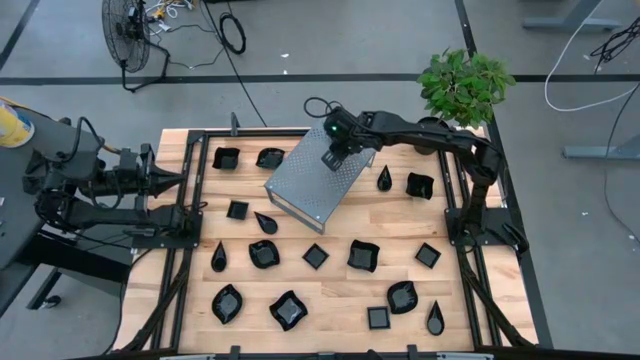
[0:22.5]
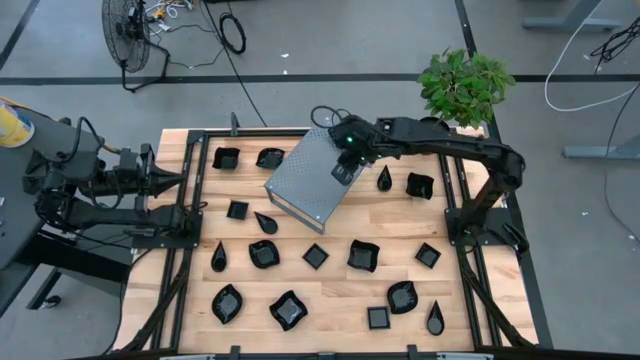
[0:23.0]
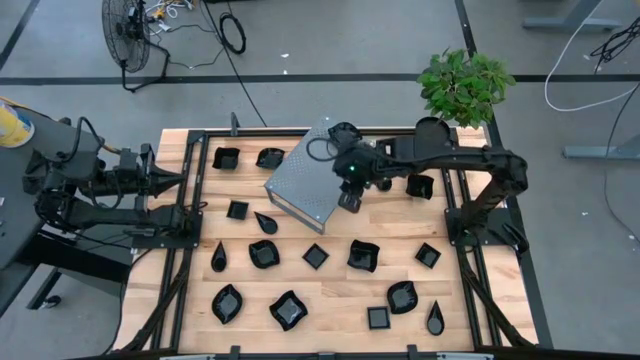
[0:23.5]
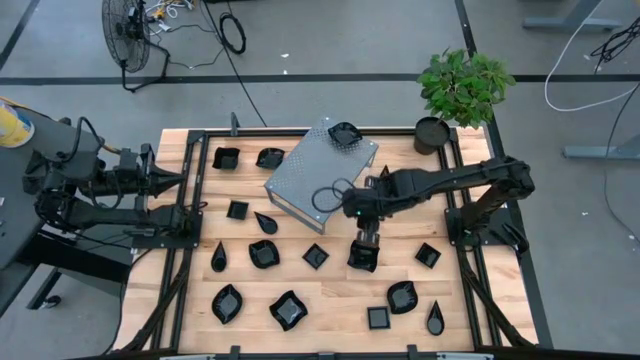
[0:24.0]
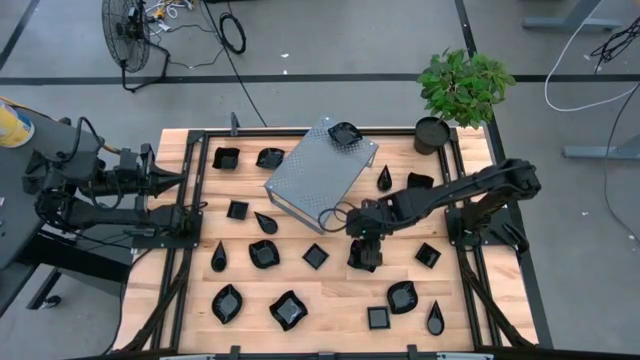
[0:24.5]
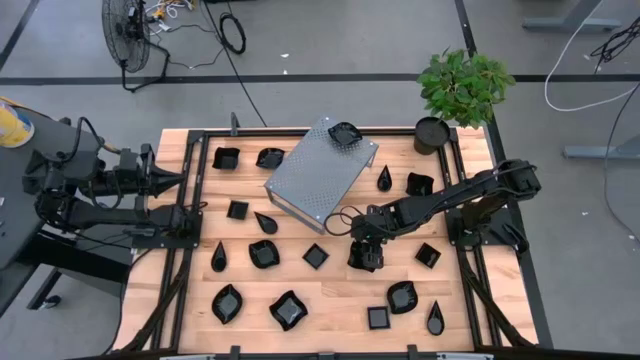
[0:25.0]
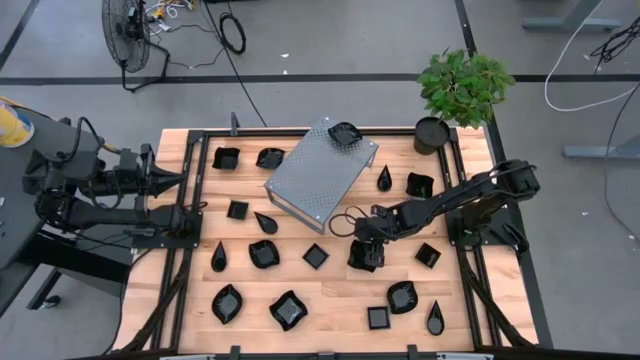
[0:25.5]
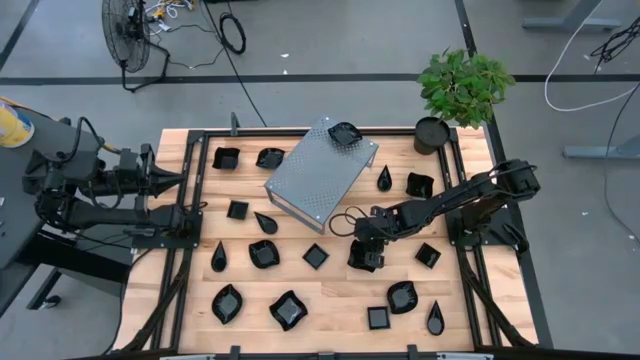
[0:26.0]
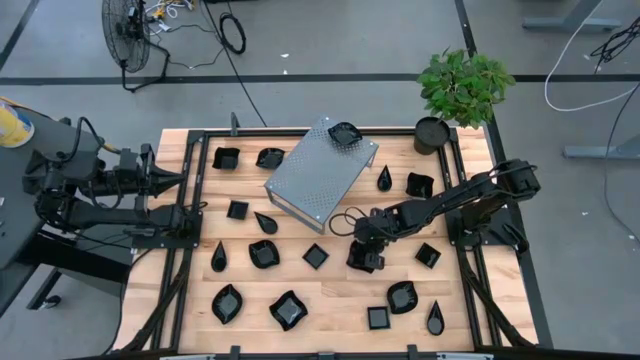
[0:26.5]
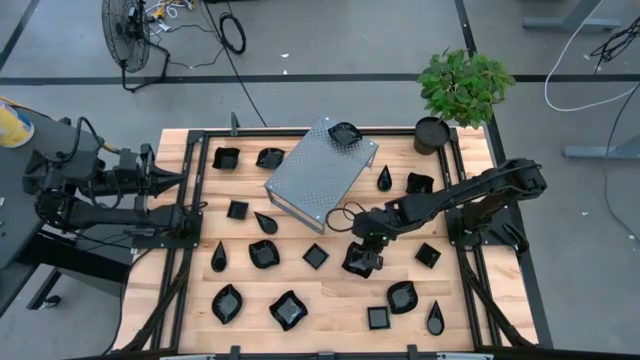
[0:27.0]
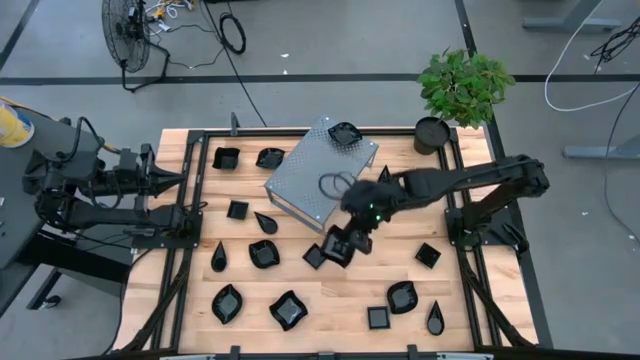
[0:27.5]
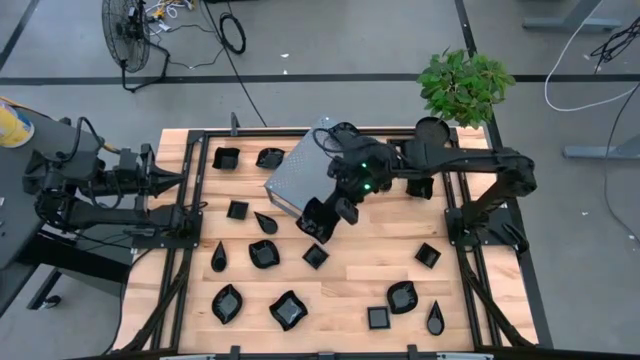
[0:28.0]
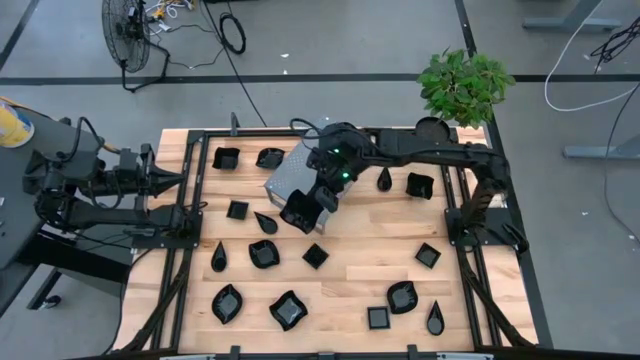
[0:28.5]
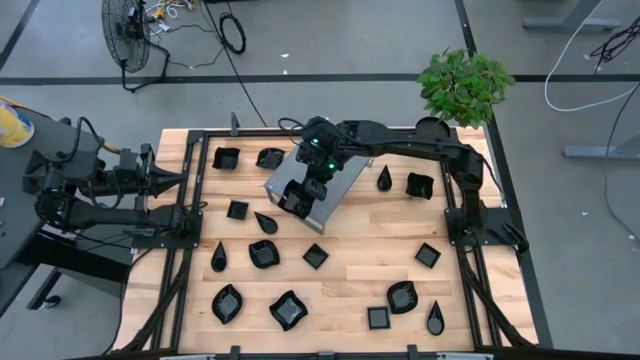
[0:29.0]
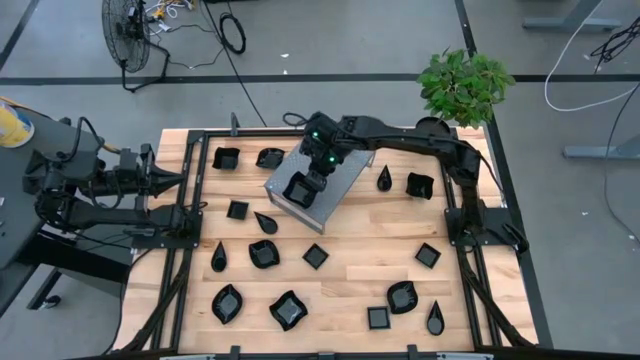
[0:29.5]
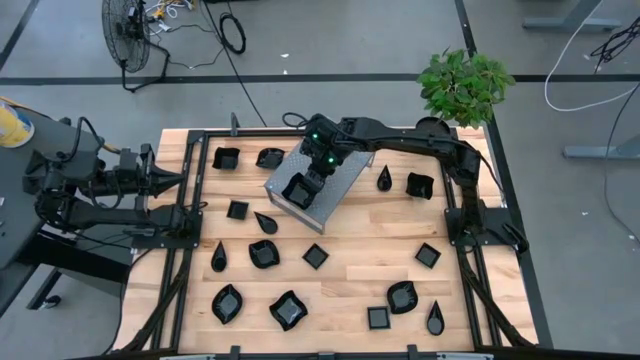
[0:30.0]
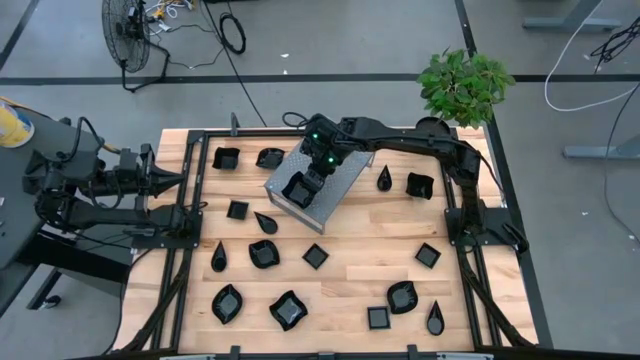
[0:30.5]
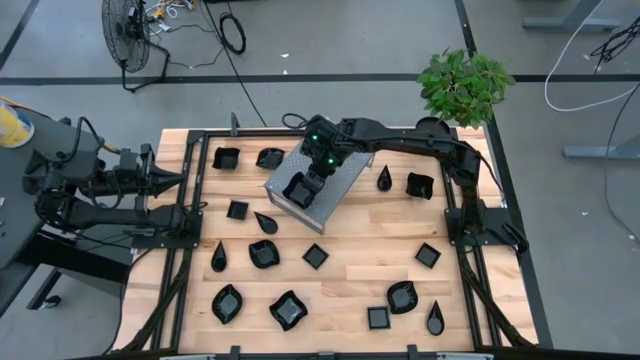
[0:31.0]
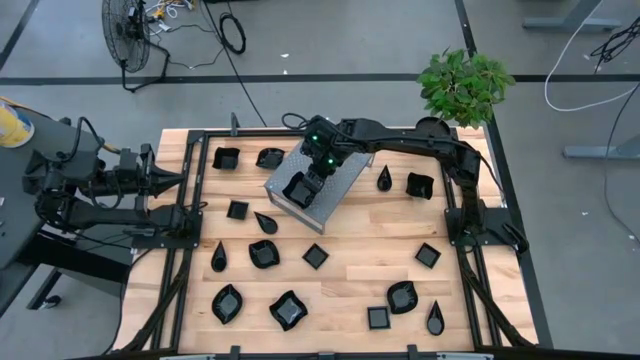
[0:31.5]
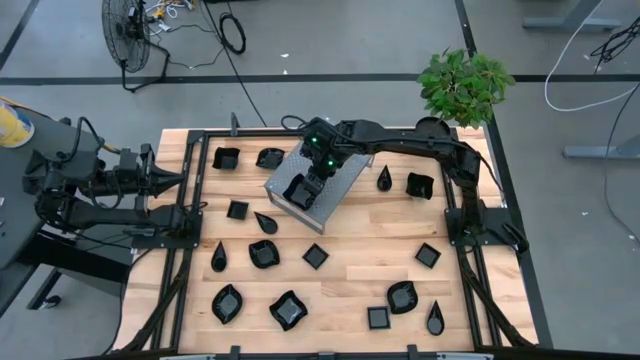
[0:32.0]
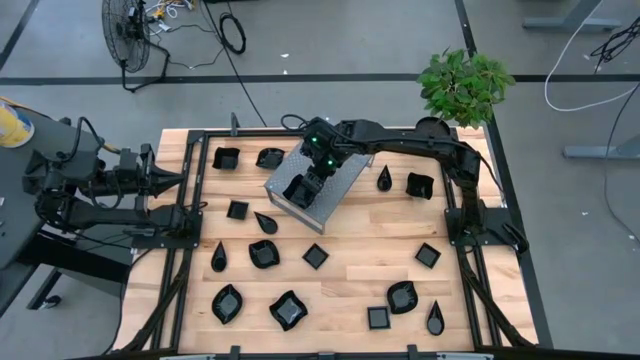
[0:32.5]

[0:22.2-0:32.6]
Task: Pick & Place Mini shaped plates
Put the black distorted square plate on the shelf

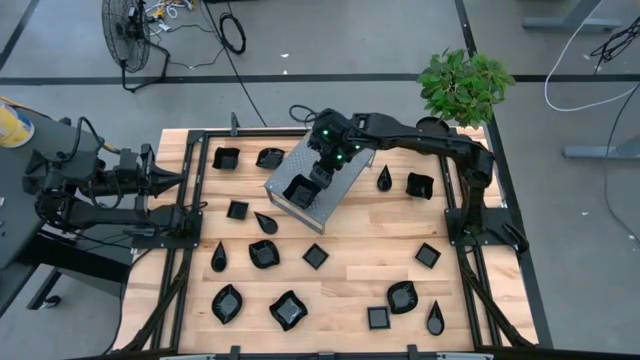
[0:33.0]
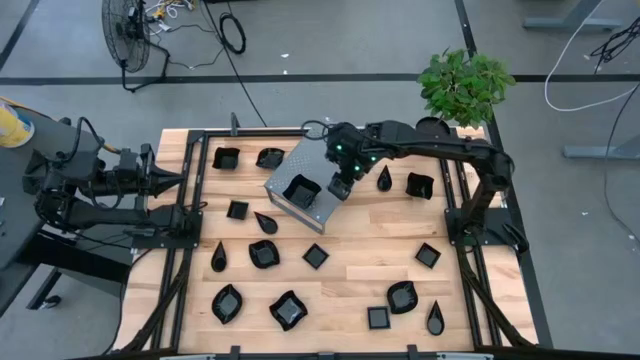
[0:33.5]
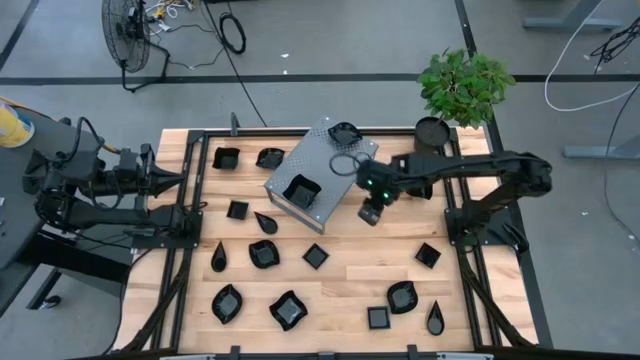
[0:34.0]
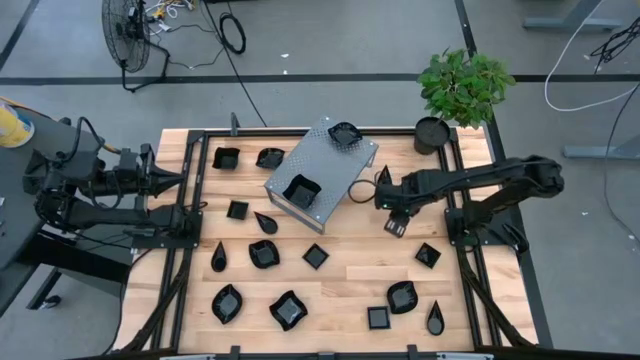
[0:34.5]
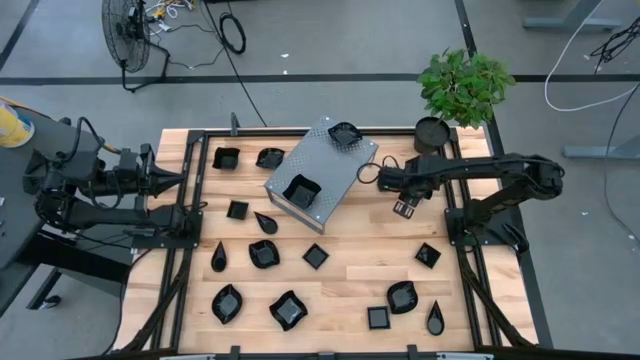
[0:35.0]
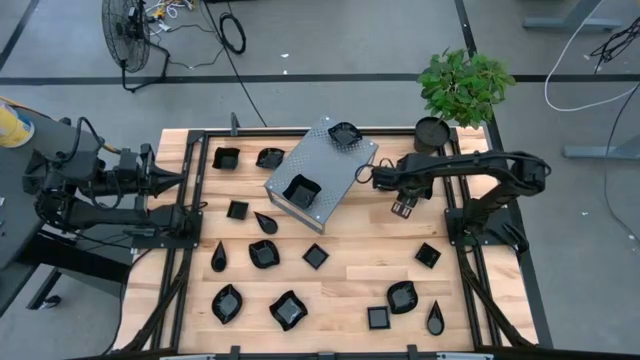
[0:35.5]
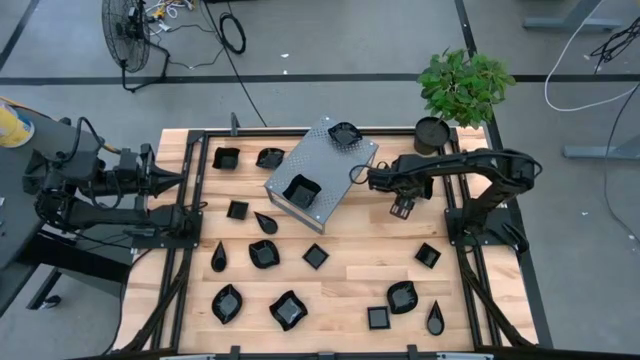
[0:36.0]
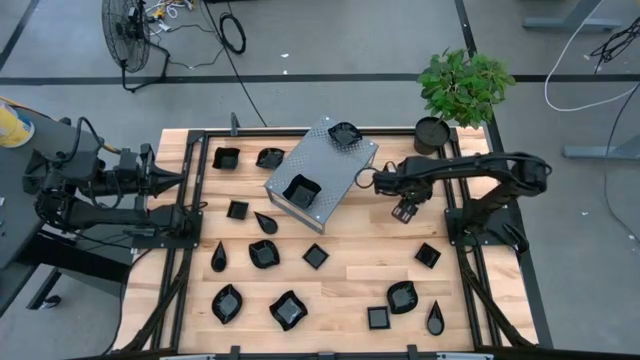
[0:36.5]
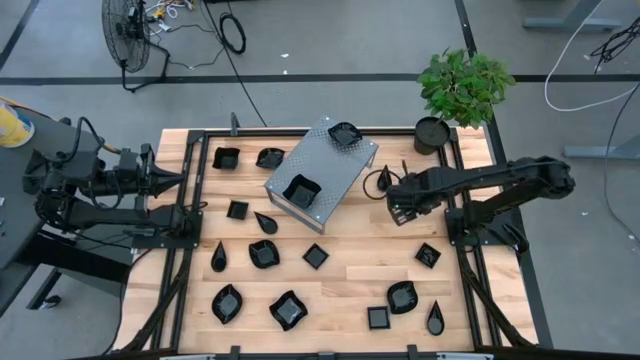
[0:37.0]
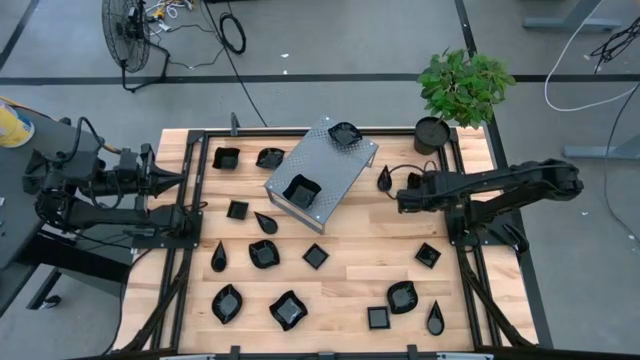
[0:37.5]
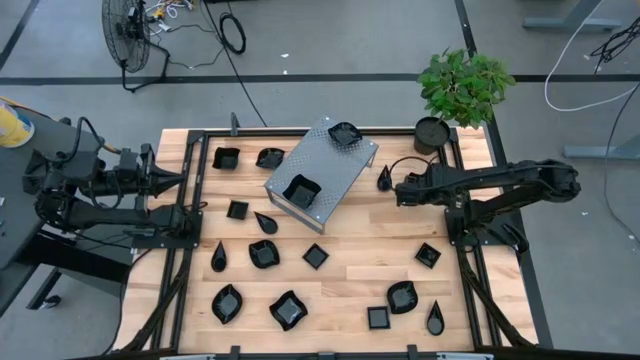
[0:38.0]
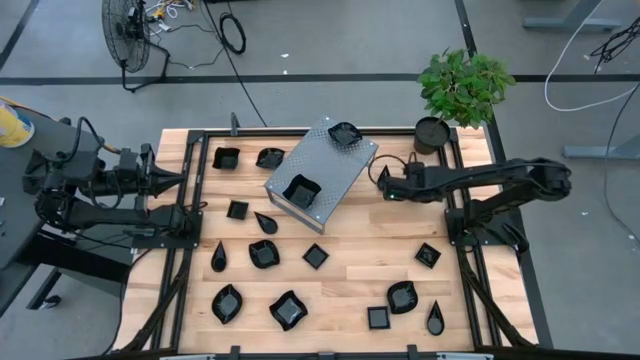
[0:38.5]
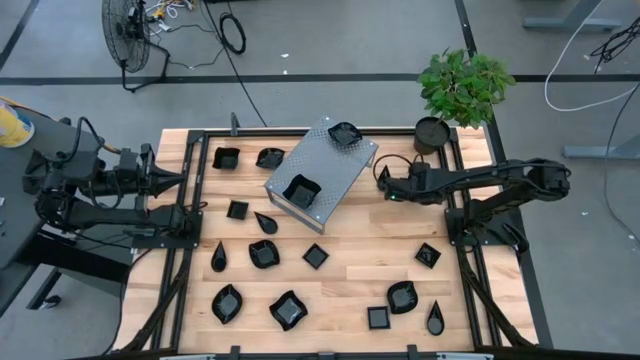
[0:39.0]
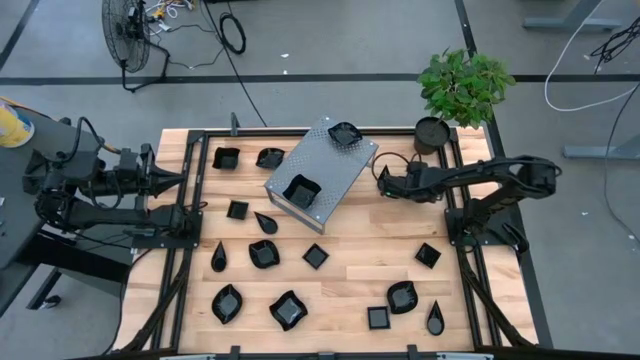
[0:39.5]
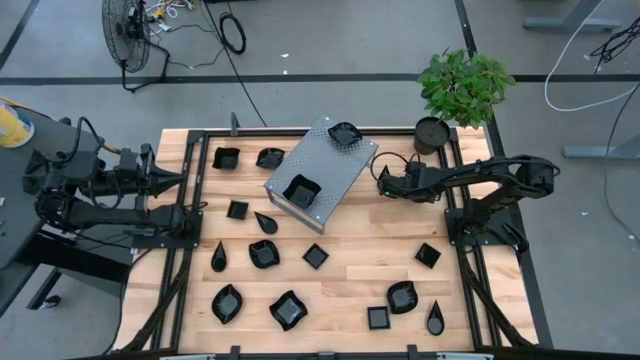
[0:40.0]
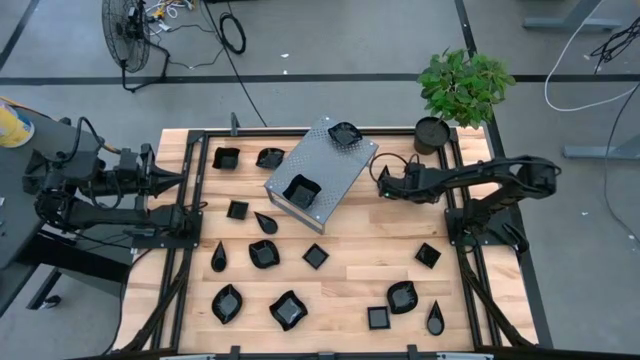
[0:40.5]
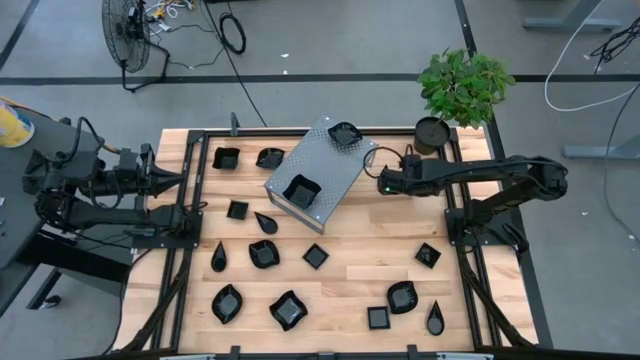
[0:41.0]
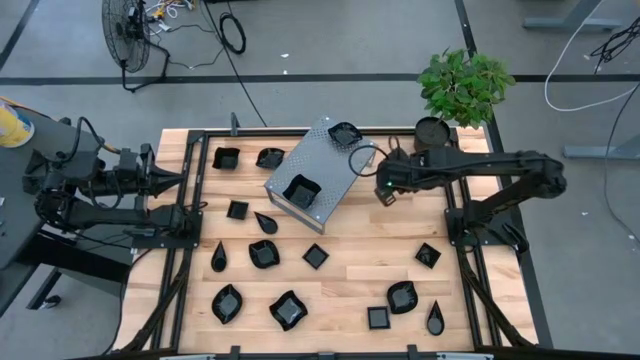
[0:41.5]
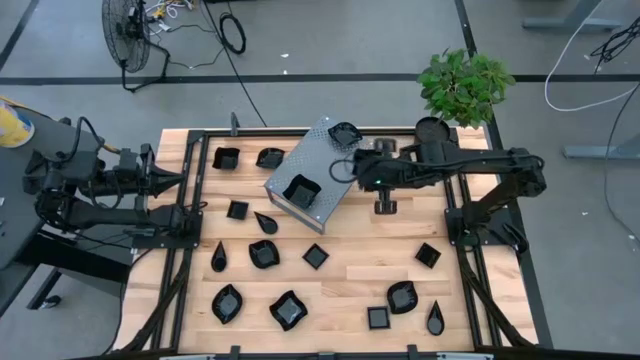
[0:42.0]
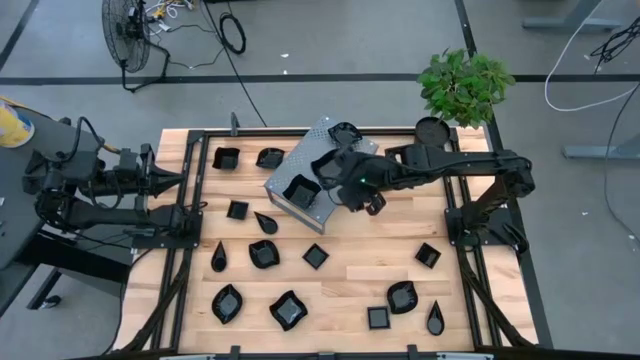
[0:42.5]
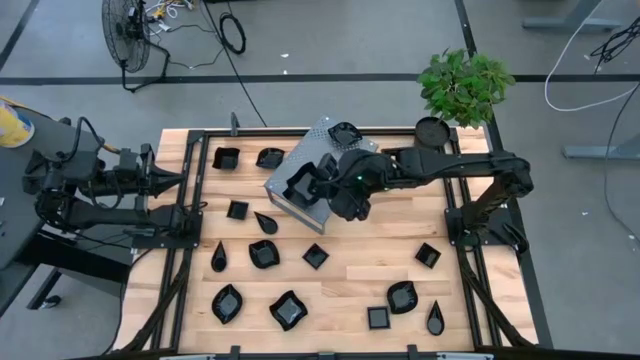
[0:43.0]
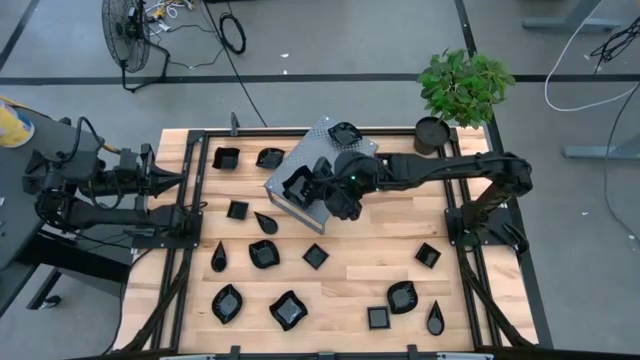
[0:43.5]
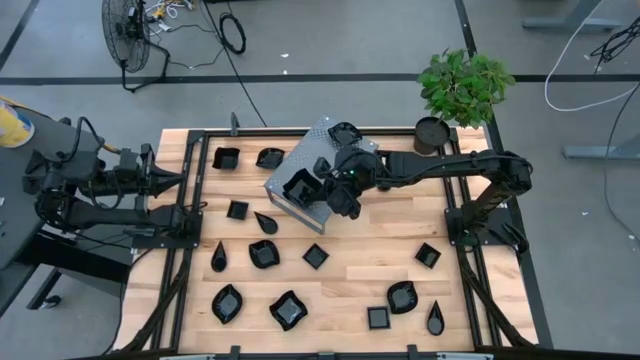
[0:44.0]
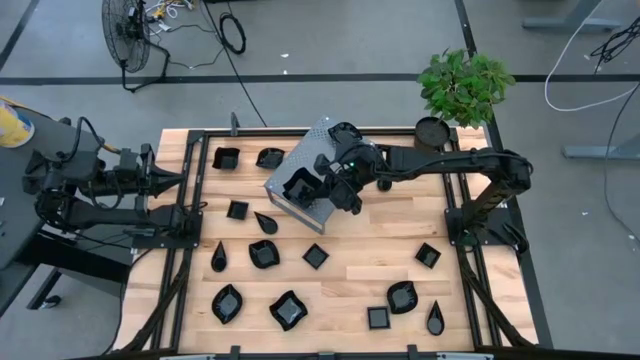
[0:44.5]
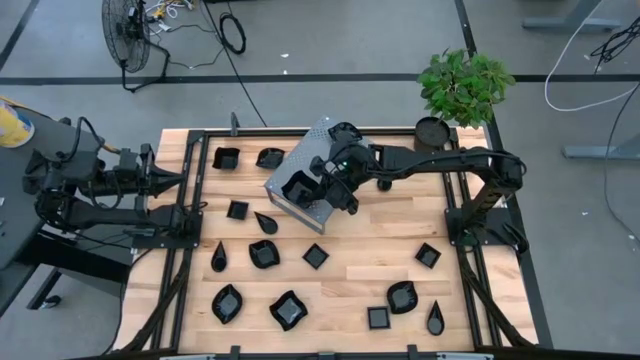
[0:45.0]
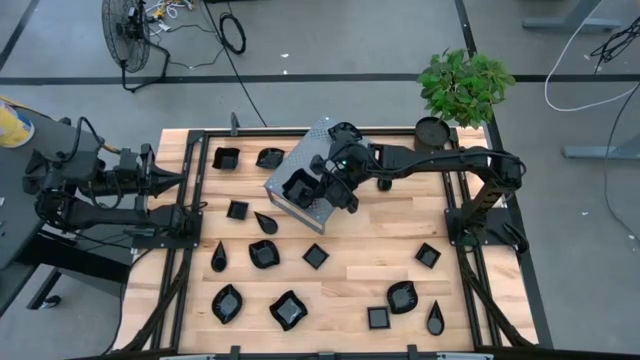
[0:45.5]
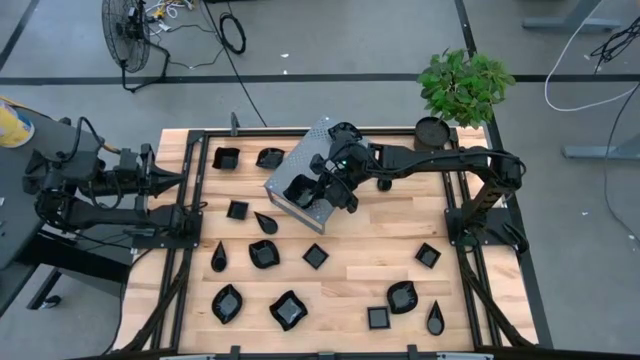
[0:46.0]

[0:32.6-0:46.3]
Stack the black distorted square plate on top of the black distorted square plate on the shelf
